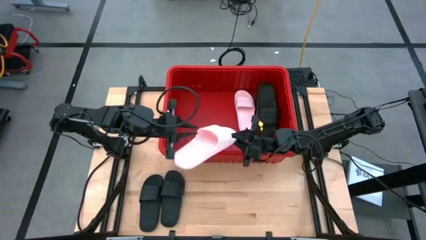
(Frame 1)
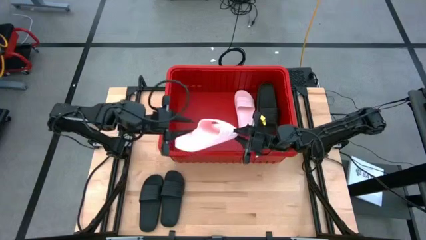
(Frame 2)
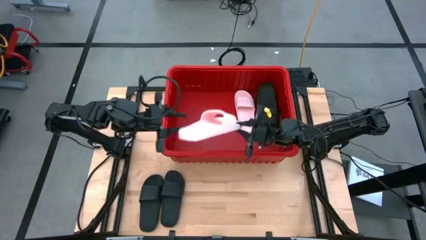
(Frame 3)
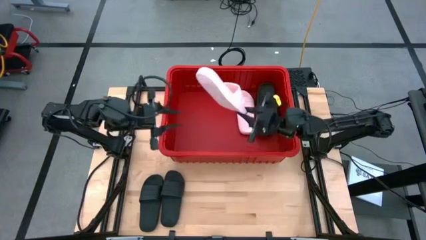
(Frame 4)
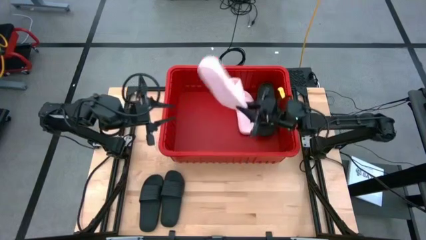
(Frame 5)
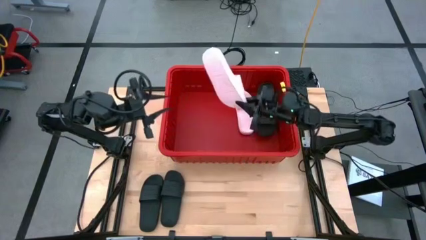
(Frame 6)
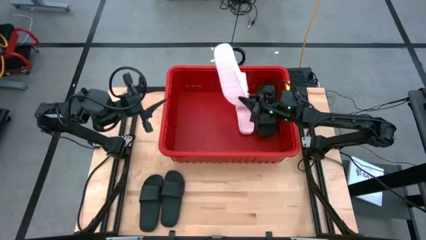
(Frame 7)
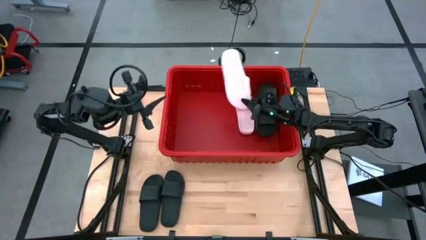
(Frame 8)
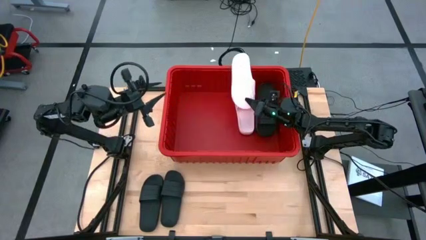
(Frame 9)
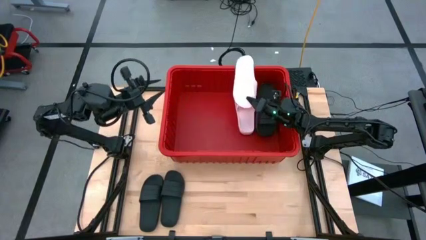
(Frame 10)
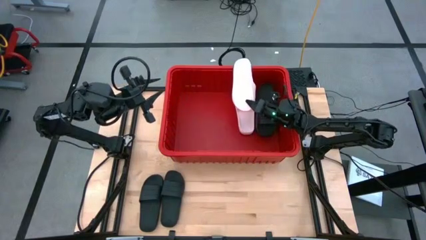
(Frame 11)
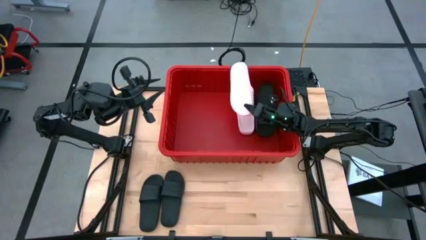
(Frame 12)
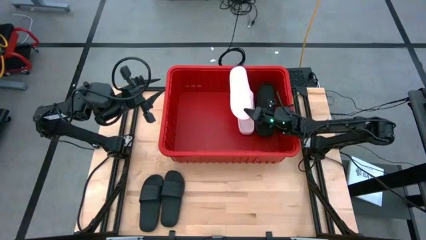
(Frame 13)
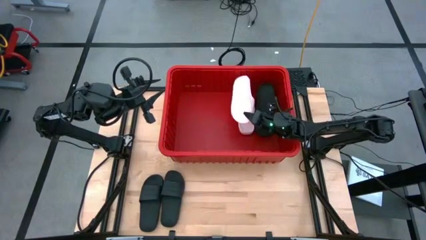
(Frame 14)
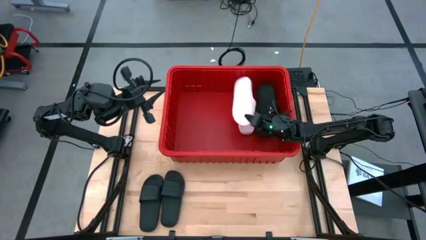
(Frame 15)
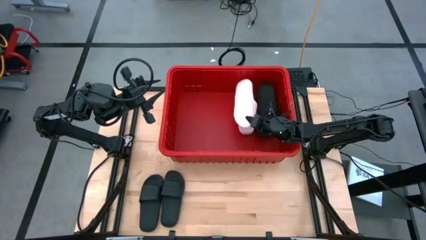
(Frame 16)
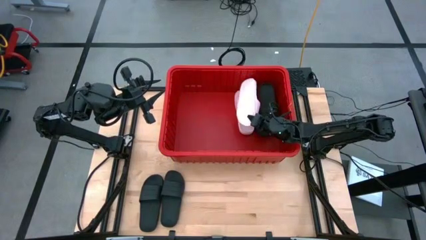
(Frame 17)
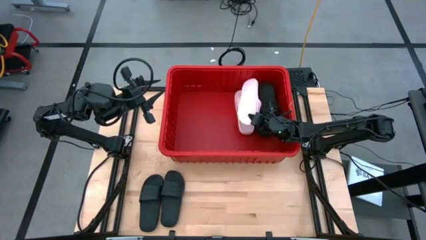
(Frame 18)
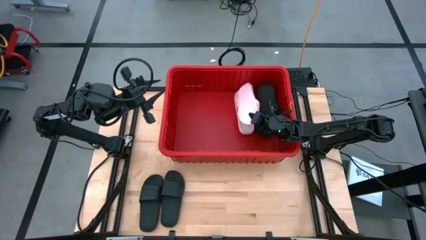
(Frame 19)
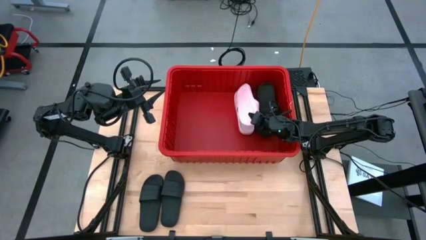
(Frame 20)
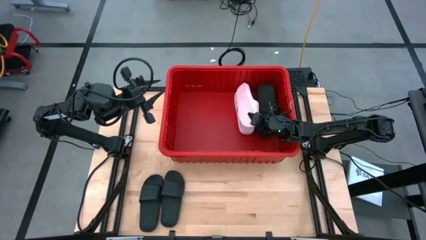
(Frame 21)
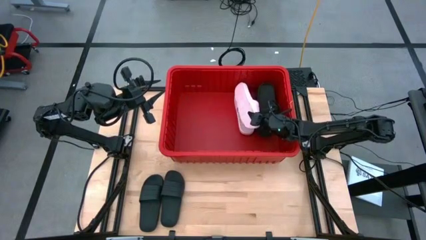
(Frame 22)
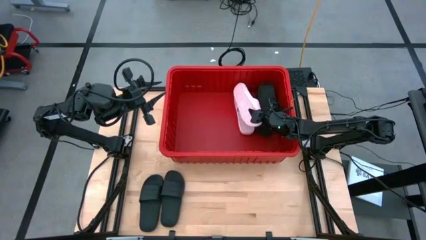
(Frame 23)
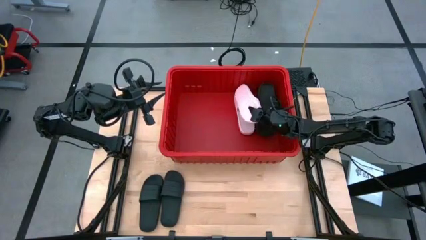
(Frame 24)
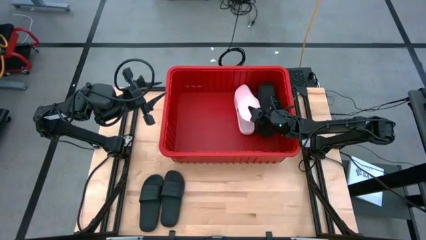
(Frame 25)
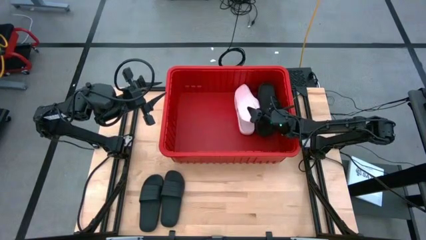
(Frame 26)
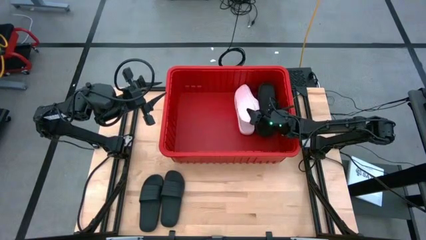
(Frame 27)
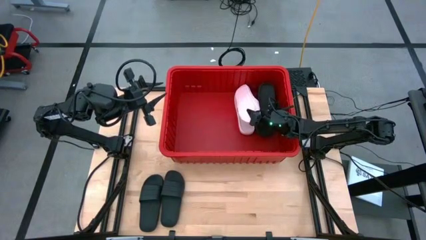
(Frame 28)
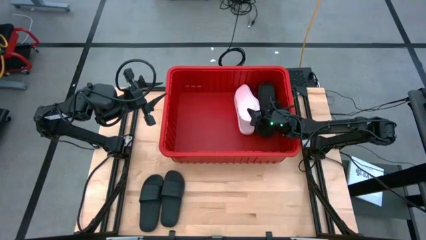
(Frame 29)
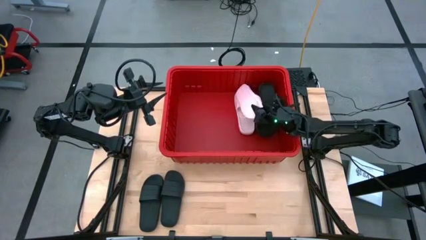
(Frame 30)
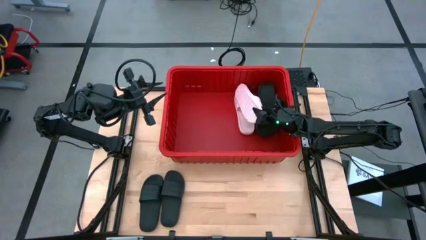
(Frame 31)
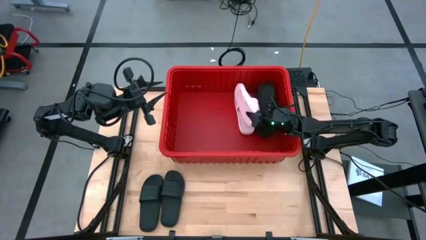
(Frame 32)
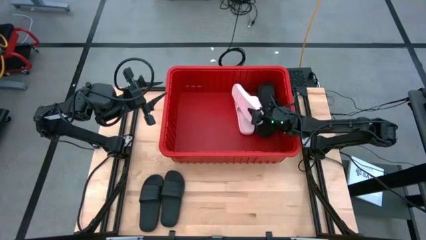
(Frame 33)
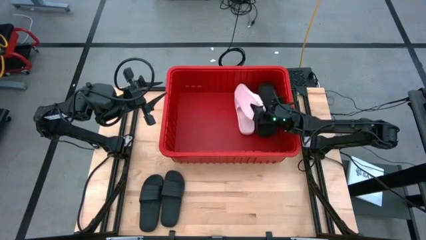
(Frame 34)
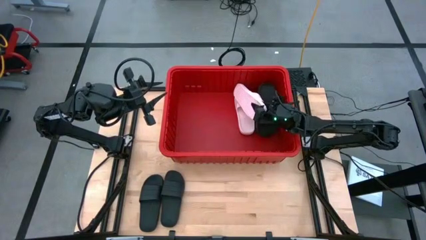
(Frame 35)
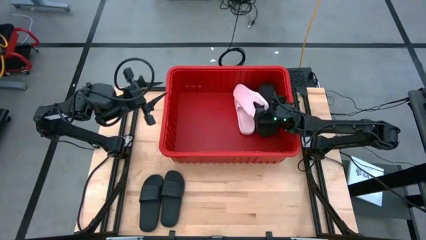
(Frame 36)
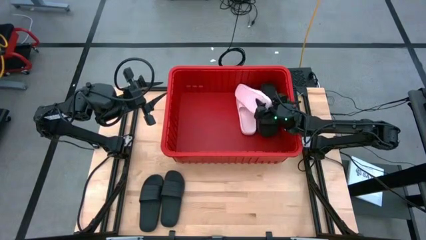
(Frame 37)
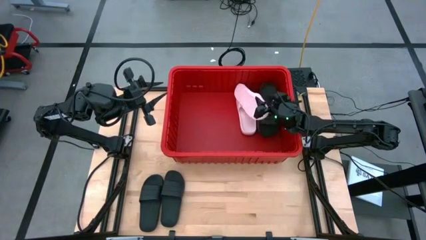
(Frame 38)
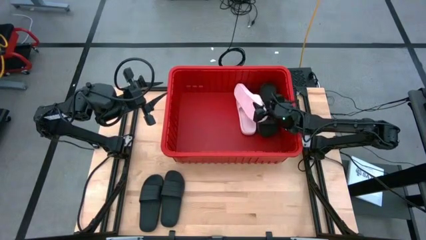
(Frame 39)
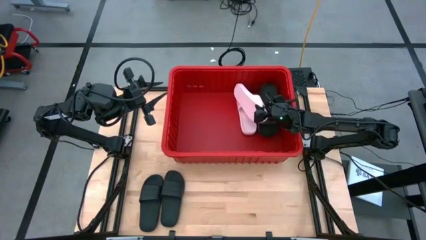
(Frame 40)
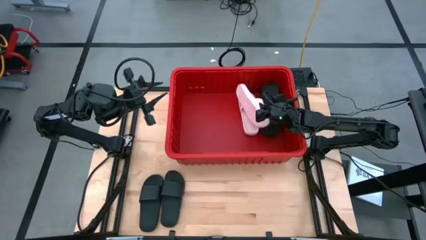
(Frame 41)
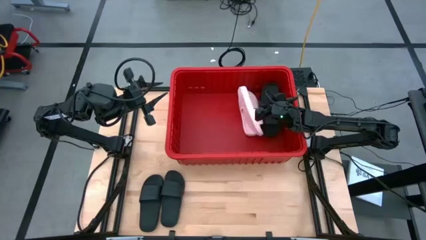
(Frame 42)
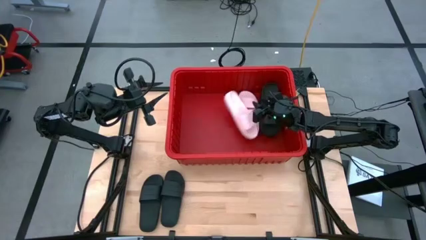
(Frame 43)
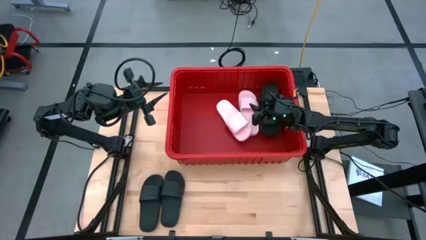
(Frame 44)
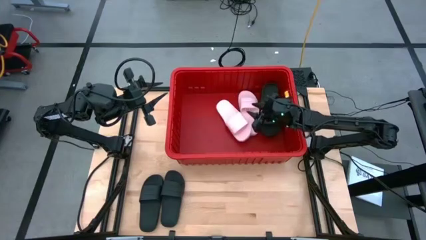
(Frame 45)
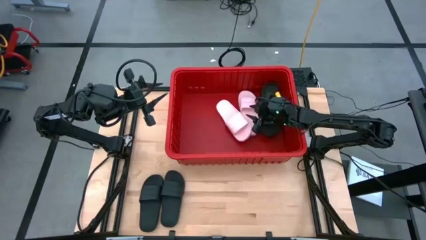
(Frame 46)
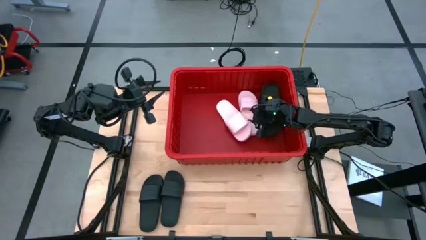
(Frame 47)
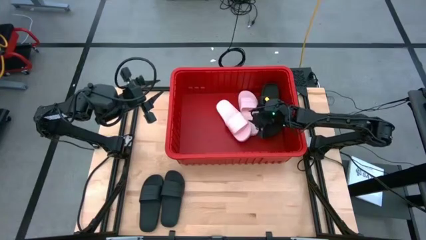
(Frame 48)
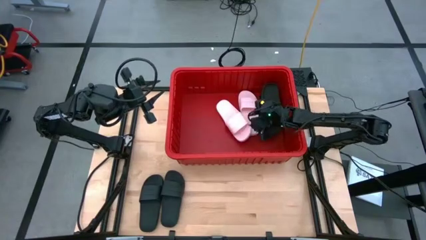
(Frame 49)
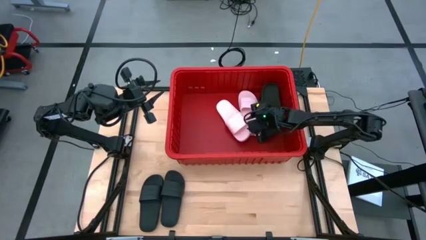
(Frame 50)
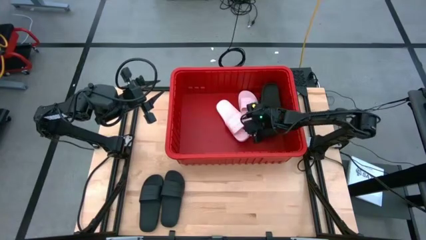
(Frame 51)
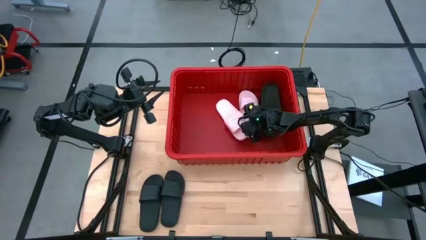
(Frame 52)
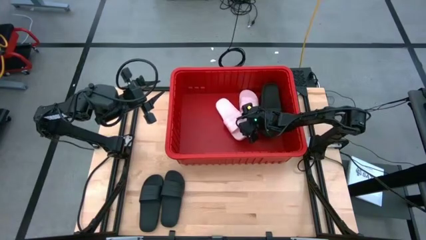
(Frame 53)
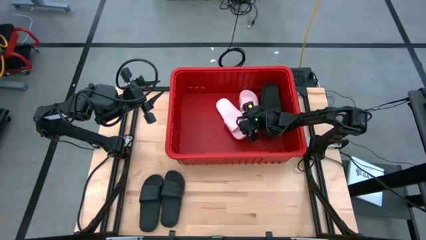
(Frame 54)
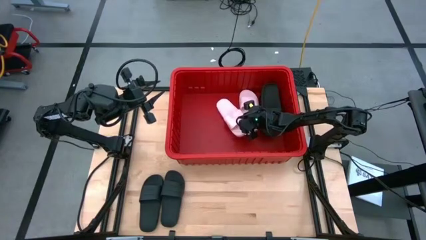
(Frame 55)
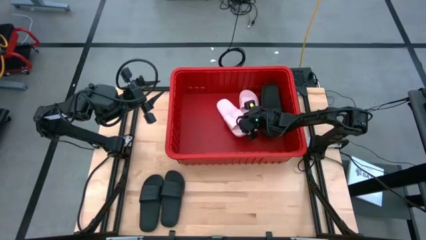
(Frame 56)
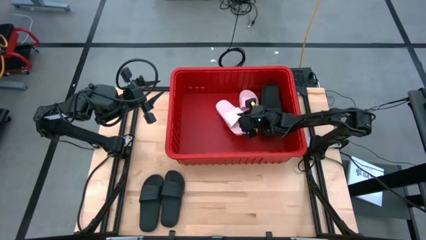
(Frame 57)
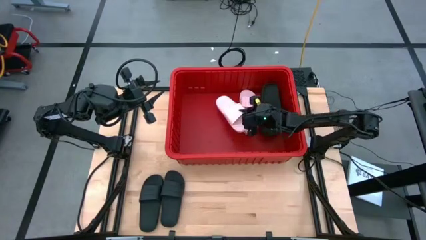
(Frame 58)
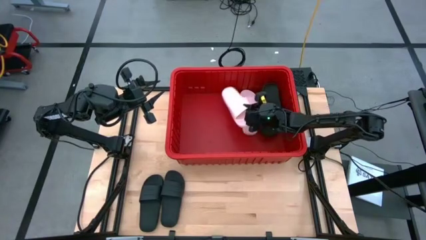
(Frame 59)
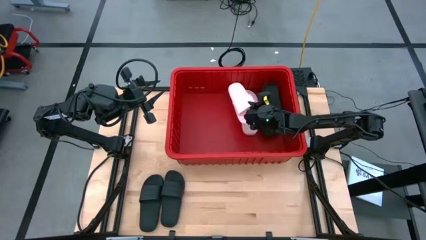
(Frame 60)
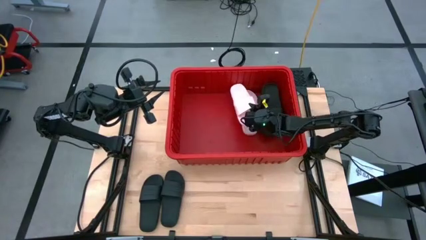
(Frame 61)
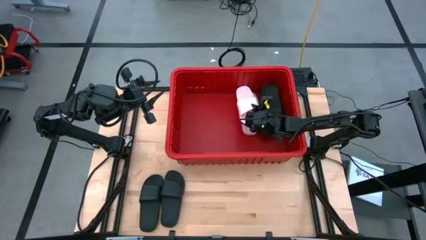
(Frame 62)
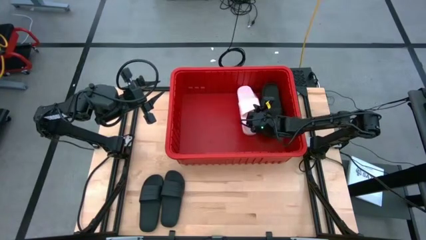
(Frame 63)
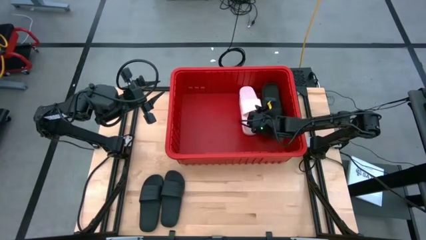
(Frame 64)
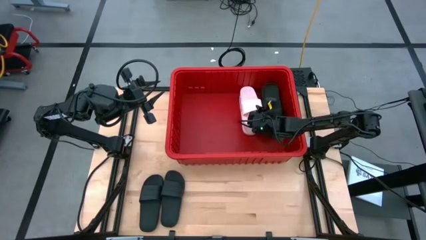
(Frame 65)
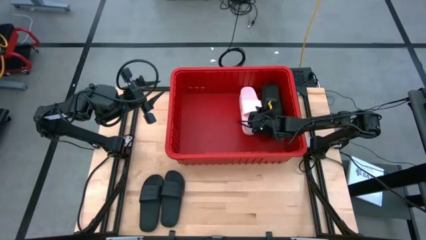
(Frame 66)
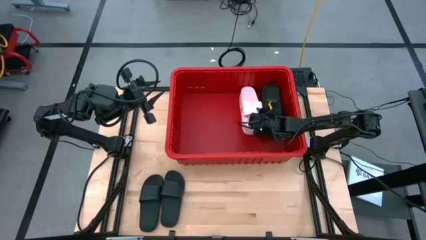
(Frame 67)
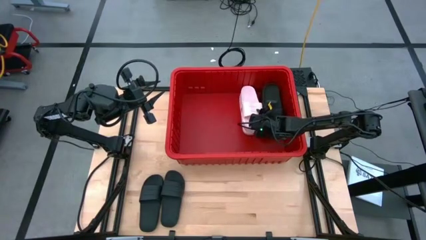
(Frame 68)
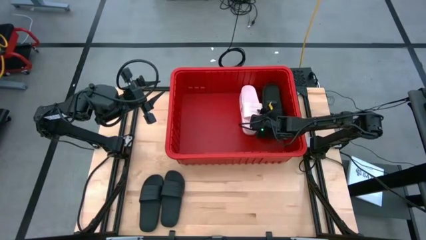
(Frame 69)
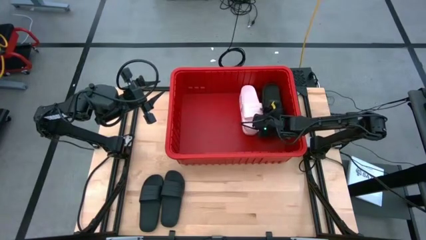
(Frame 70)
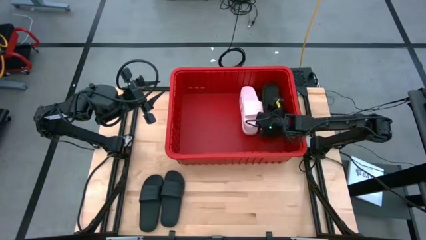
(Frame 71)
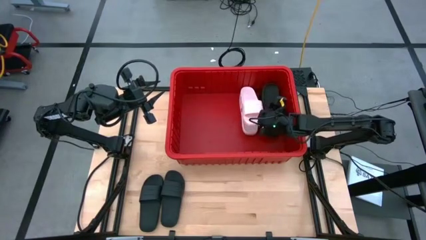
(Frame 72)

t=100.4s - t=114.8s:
Task: Pick and place slides into bin
Put the pink slide into the red organizer bin
